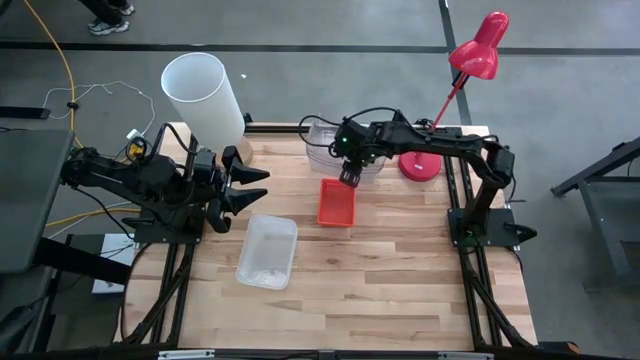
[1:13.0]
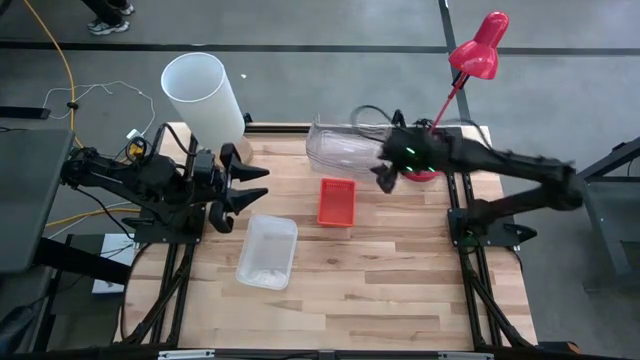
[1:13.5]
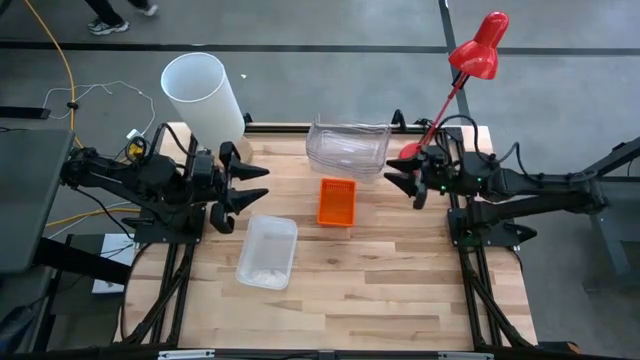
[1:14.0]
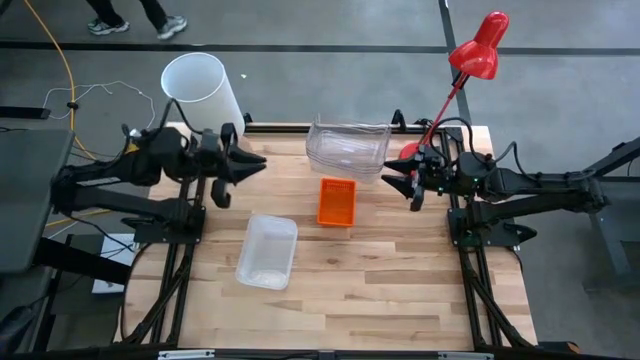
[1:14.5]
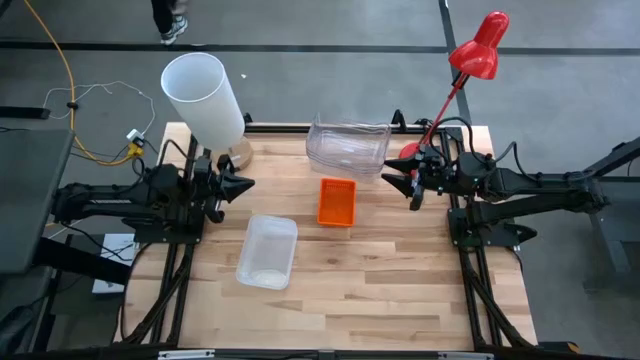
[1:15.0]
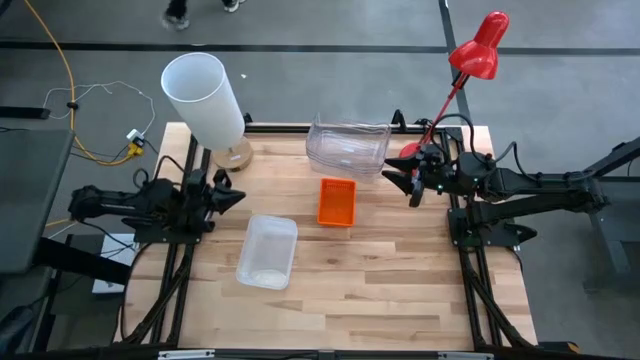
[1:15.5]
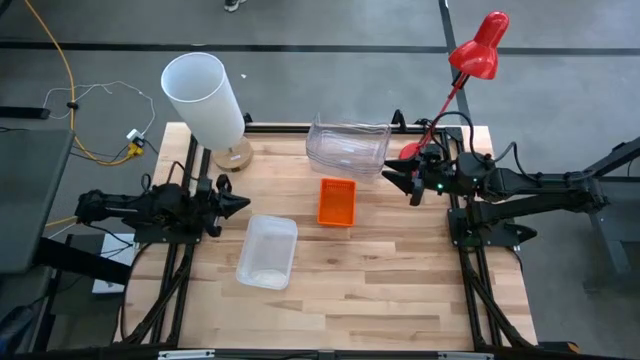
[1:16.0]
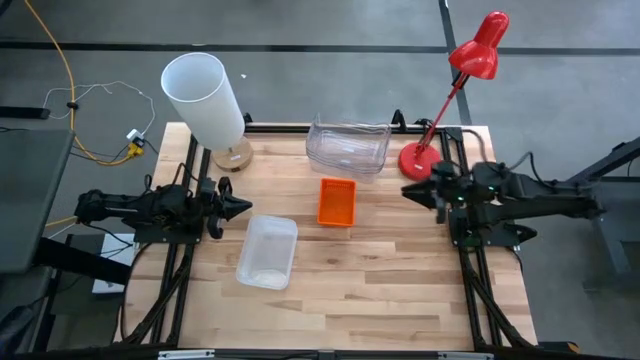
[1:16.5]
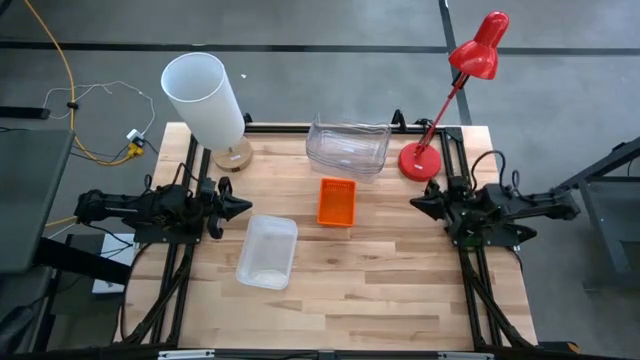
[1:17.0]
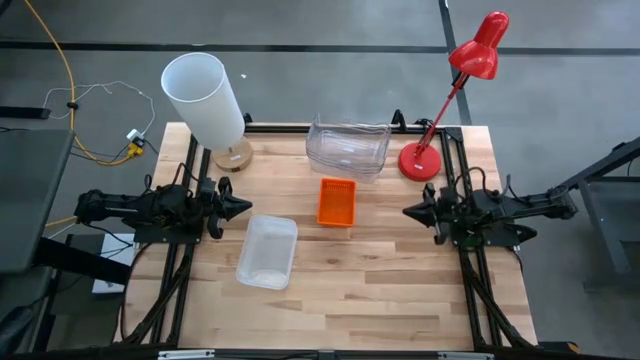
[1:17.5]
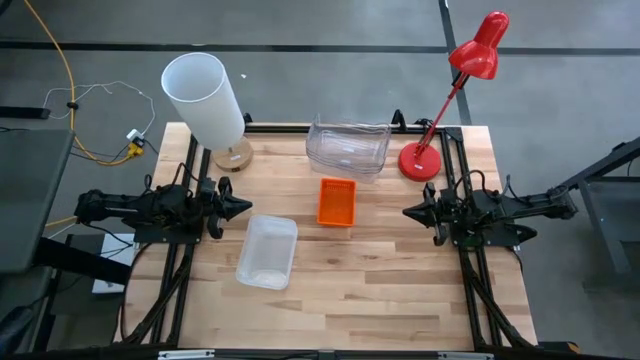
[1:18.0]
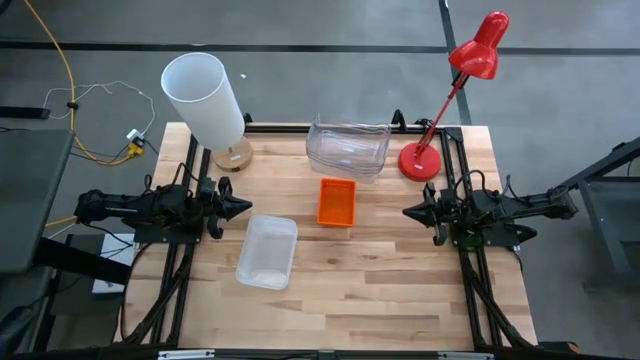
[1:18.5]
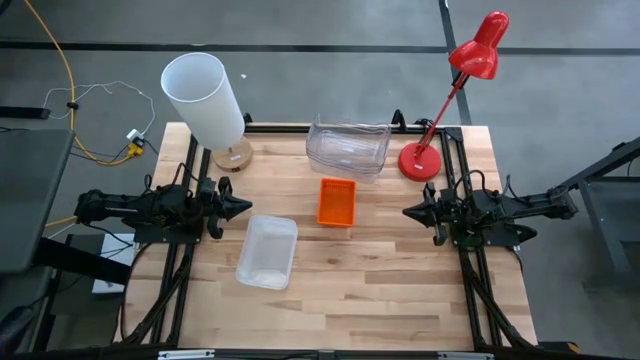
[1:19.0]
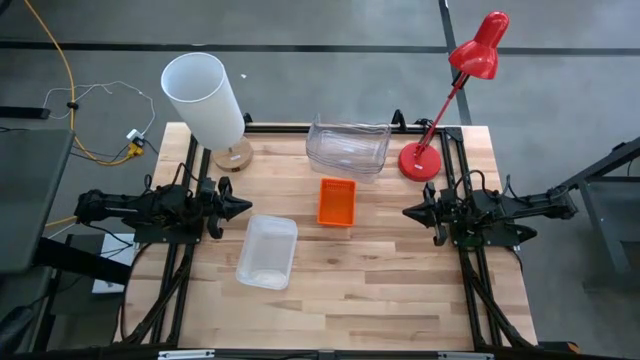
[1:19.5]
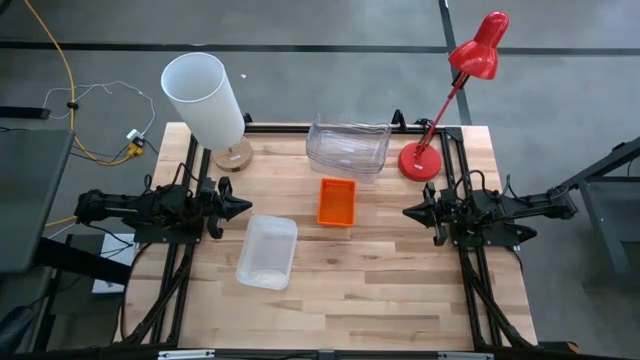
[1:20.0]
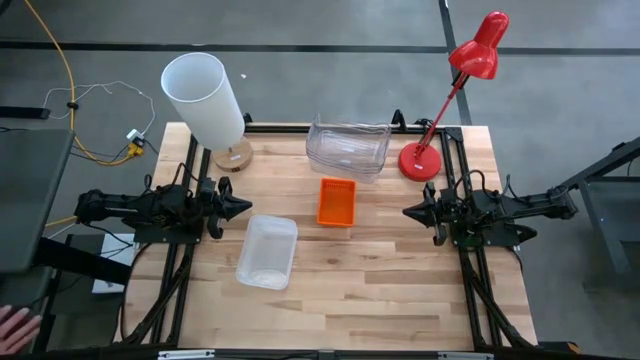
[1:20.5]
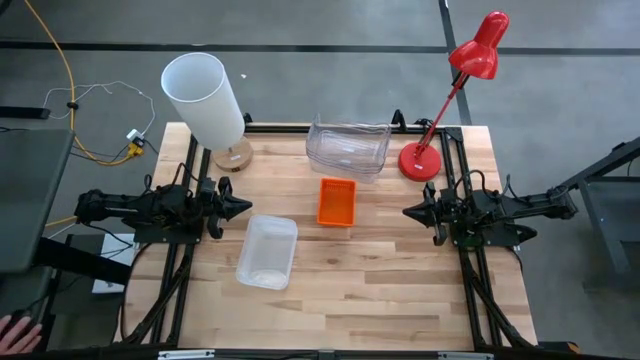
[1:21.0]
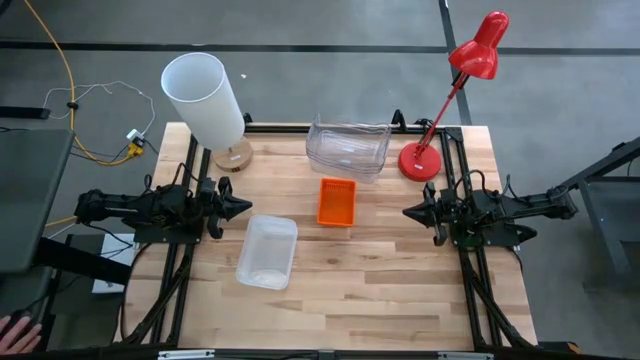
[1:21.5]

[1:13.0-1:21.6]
Return to Home Position
